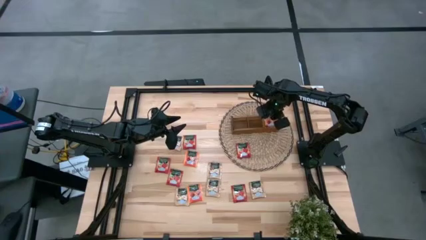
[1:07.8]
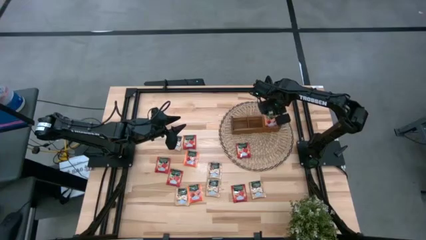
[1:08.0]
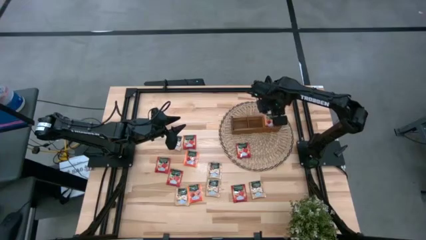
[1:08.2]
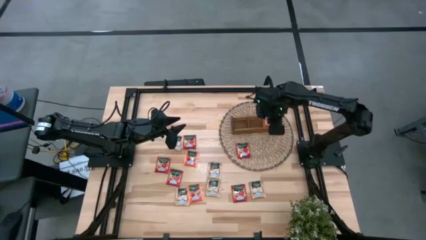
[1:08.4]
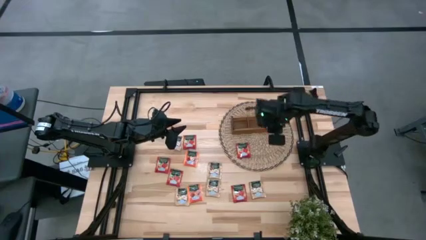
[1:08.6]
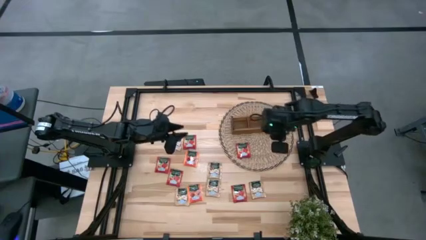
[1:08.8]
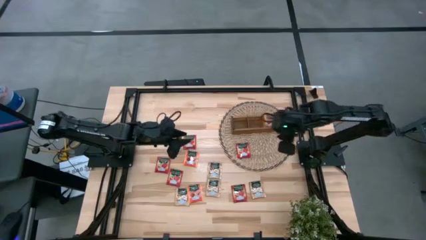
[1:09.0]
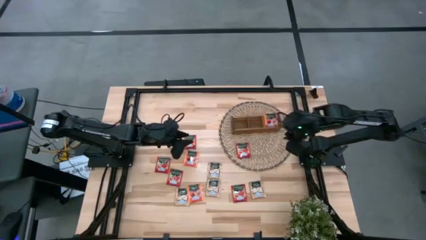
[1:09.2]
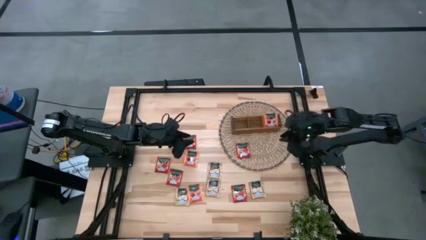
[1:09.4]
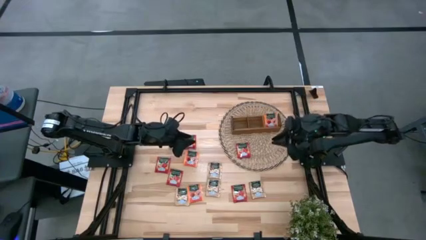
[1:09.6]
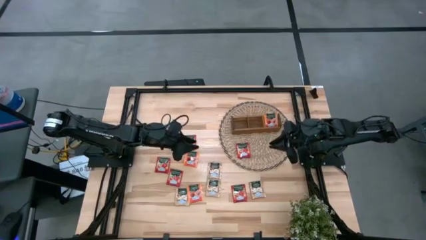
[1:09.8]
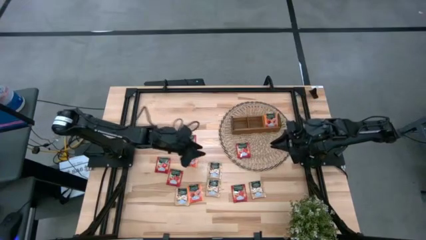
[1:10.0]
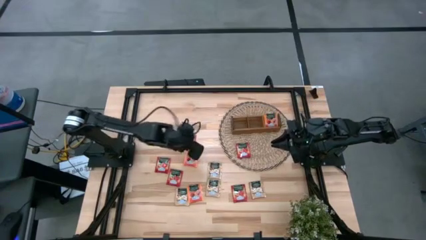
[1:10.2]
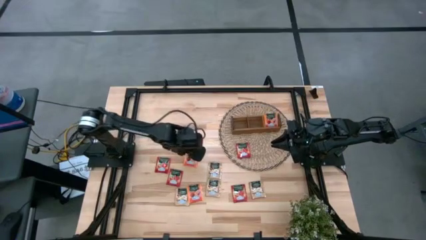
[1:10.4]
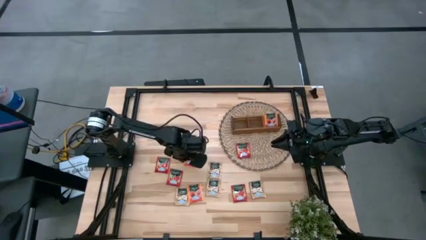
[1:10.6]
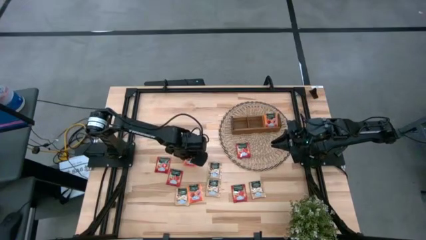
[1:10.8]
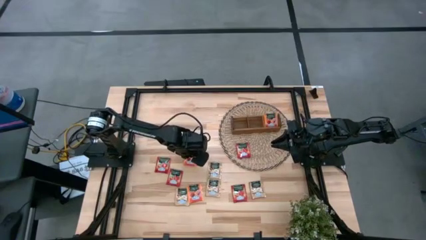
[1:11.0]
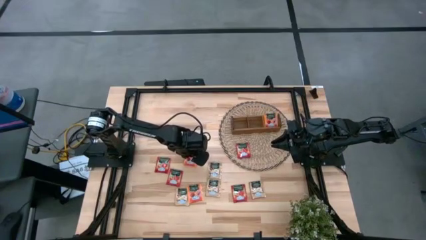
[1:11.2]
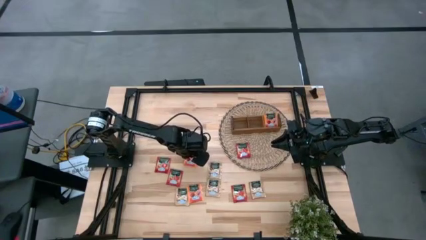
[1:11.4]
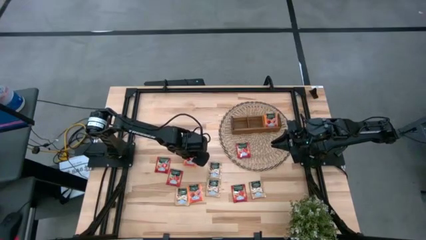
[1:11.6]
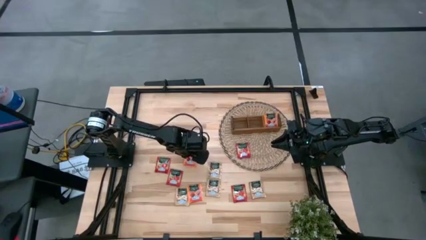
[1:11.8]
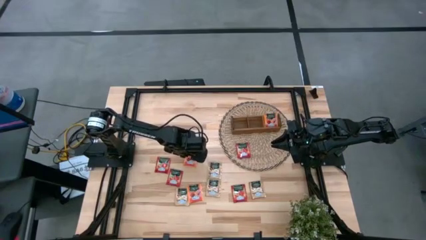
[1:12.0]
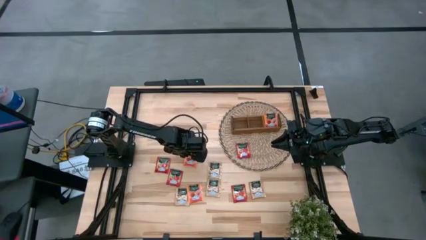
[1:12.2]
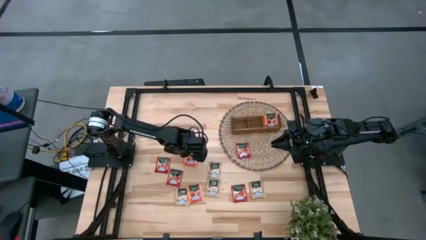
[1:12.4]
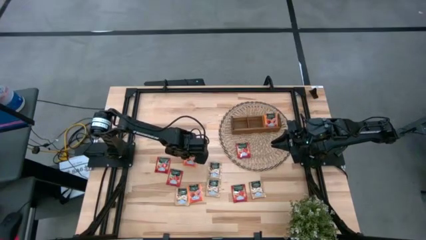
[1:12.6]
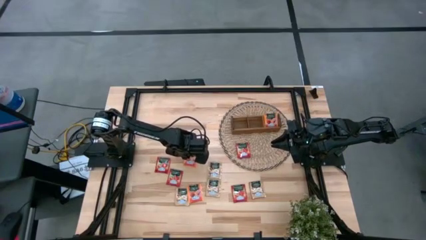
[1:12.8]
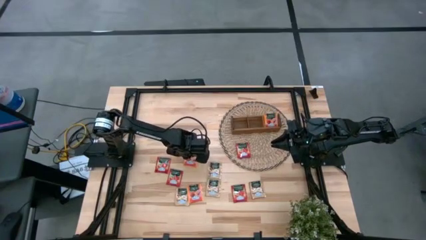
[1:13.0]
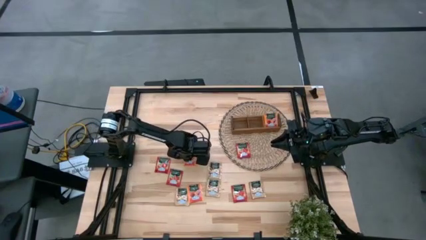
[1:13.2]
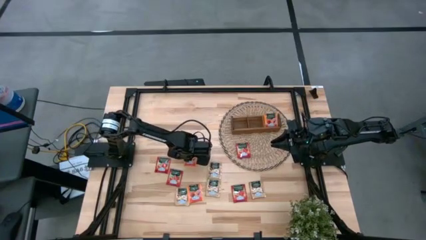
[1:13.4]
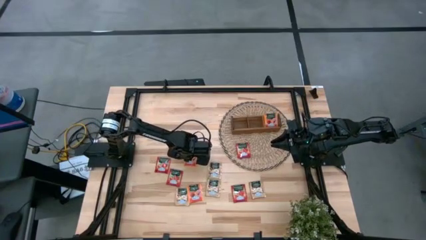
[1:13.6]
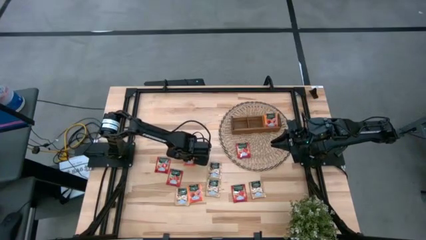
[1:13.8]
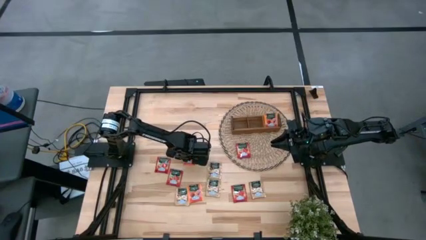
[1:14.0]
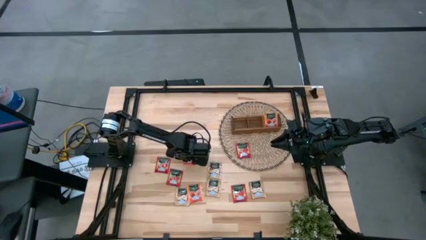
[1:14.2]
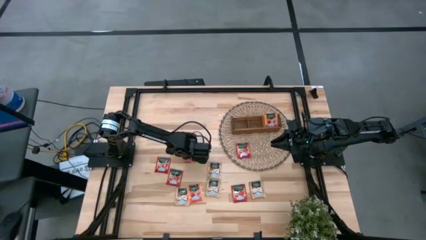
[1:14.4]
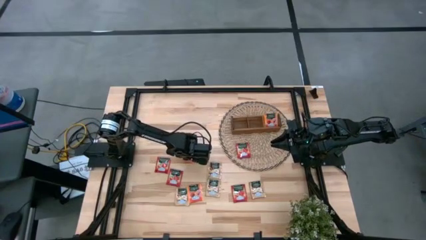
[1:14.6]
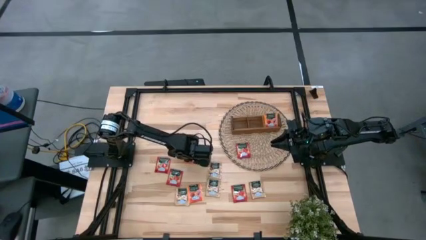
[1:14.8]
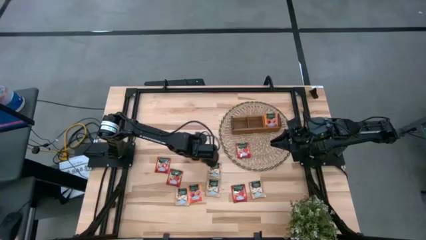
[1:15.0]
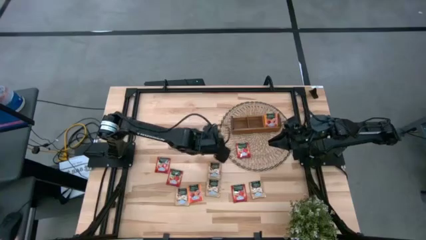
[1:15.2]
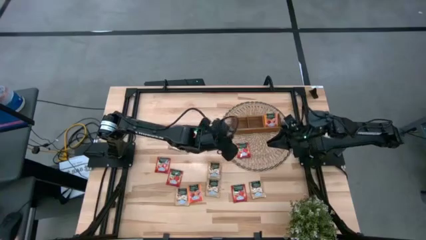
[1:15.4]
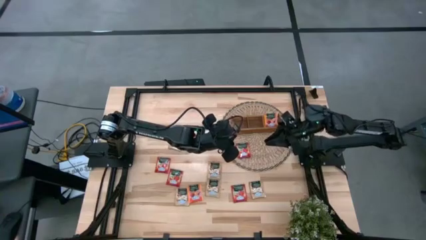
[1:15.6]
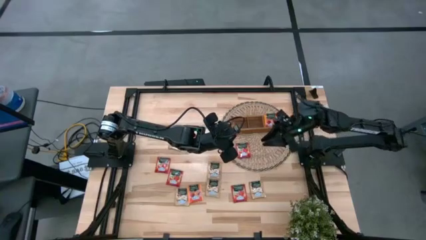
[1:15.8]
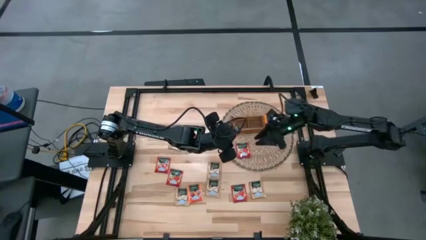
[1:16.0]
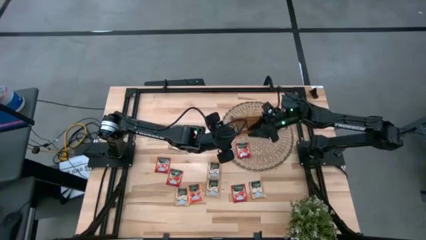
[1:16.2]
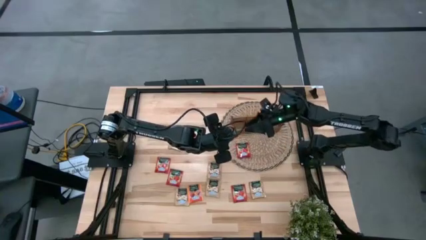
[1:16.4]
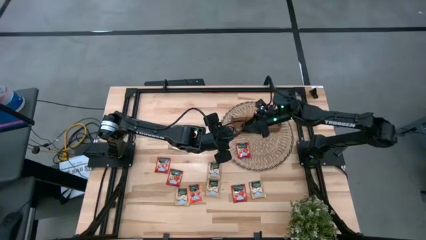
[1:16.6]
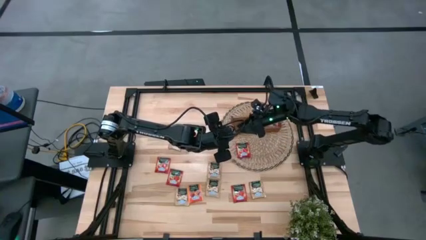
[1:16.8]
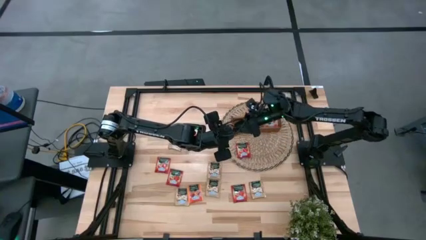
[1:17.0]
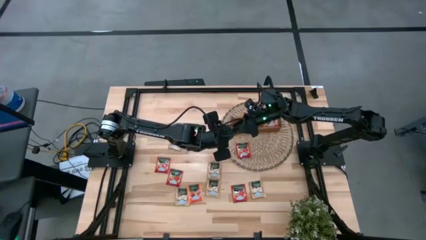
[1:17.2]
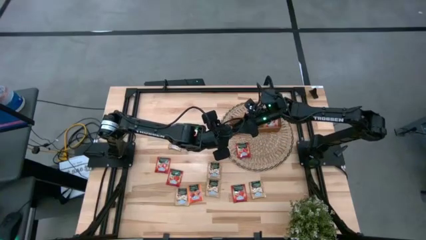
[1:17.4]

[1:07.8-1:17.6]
Task: Pick & Place Tea
Put the orange tea pack into the right compartment of the brown organizer

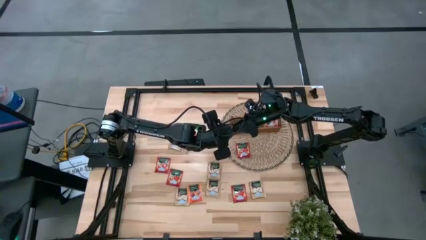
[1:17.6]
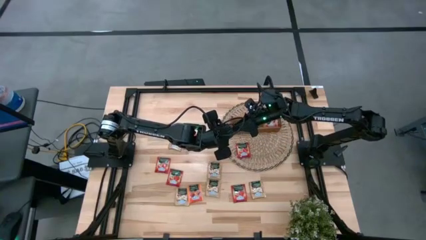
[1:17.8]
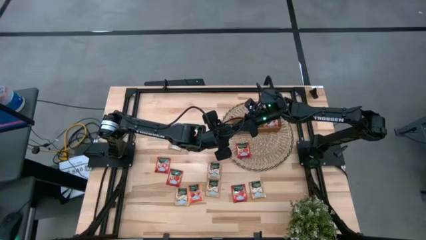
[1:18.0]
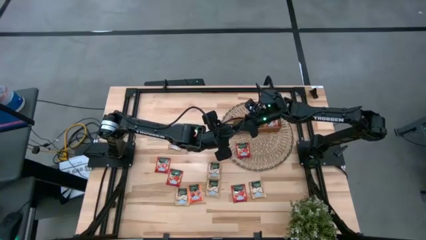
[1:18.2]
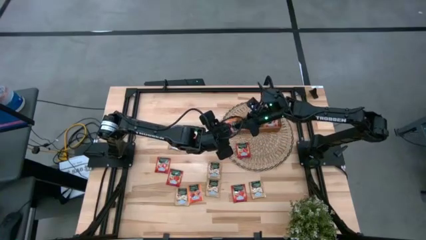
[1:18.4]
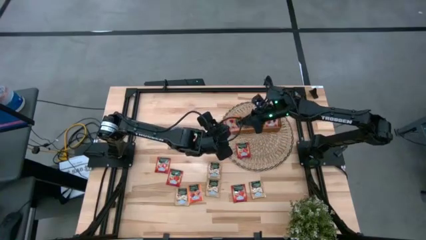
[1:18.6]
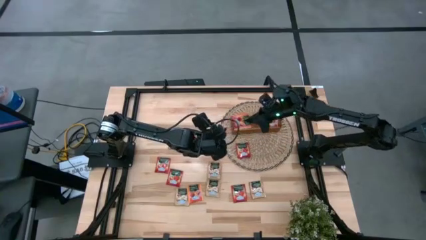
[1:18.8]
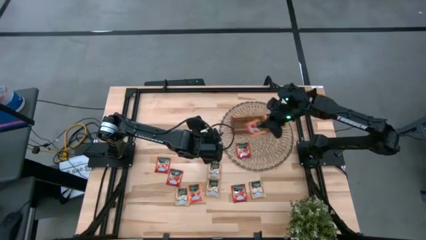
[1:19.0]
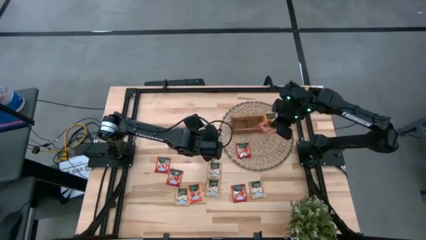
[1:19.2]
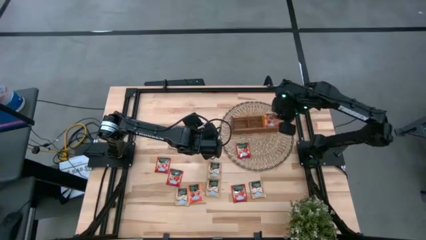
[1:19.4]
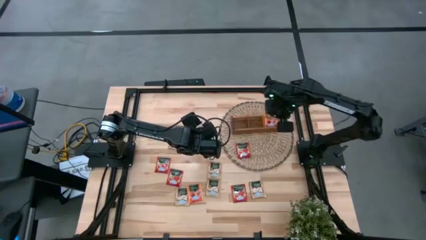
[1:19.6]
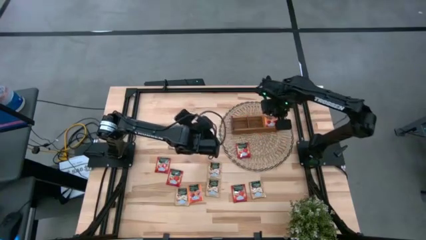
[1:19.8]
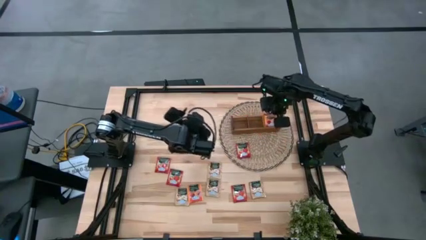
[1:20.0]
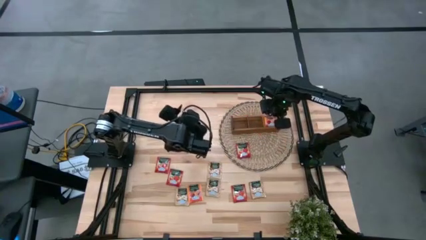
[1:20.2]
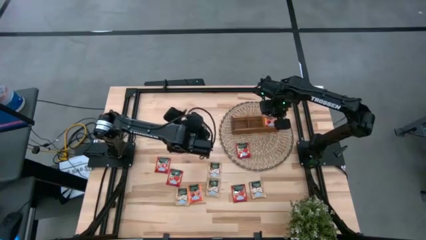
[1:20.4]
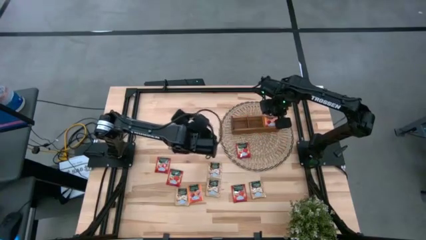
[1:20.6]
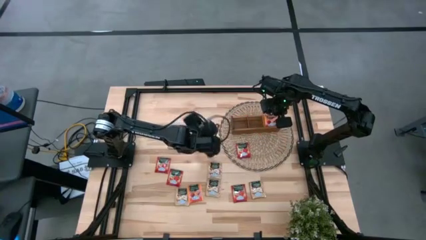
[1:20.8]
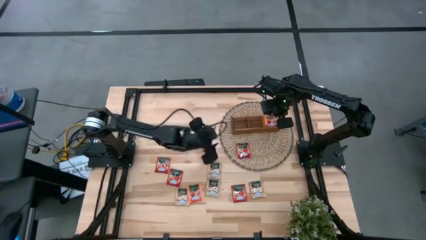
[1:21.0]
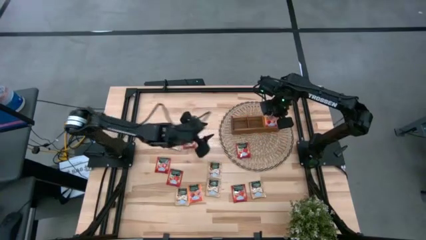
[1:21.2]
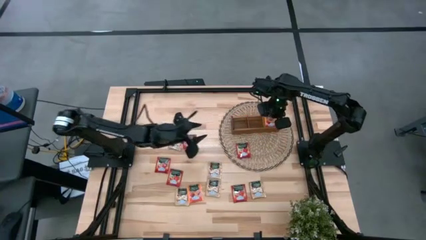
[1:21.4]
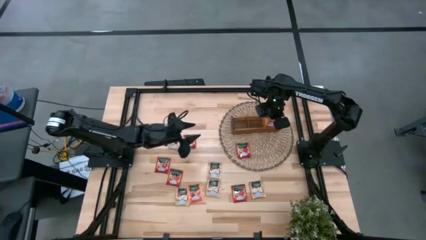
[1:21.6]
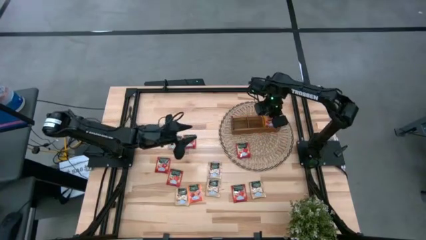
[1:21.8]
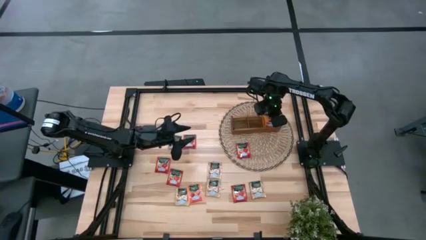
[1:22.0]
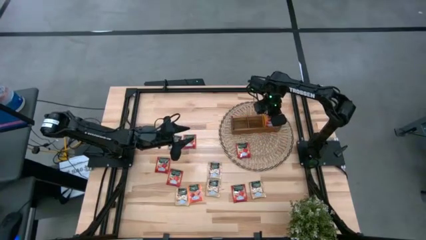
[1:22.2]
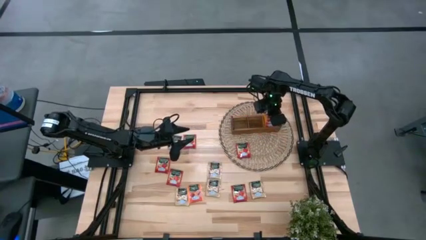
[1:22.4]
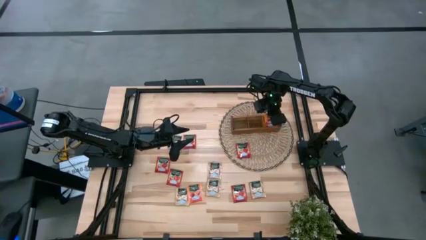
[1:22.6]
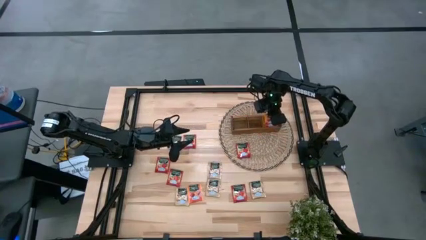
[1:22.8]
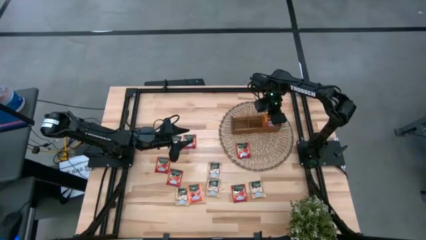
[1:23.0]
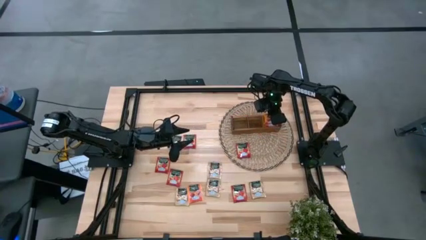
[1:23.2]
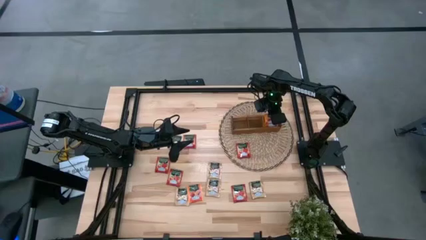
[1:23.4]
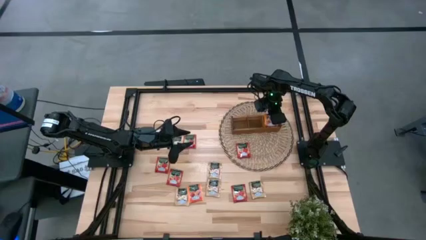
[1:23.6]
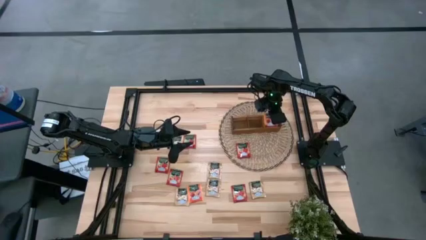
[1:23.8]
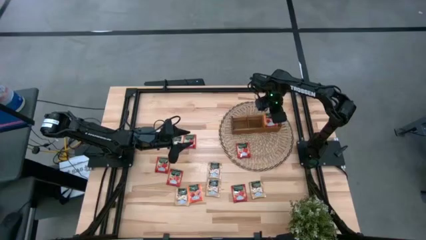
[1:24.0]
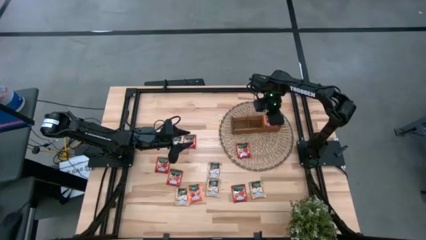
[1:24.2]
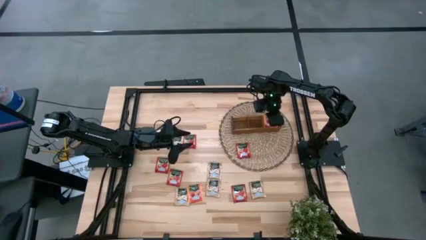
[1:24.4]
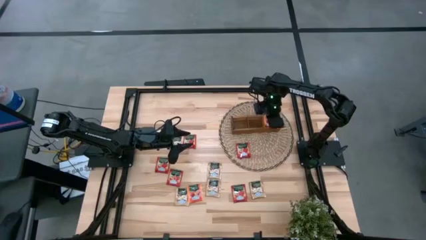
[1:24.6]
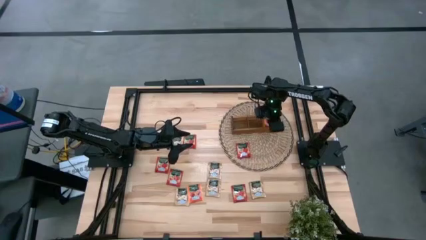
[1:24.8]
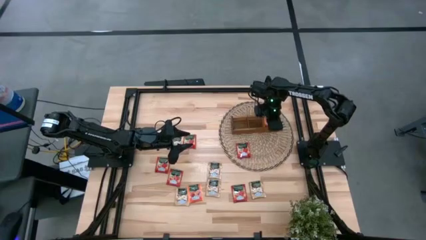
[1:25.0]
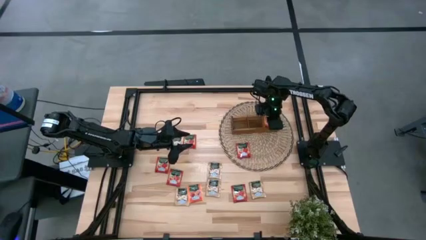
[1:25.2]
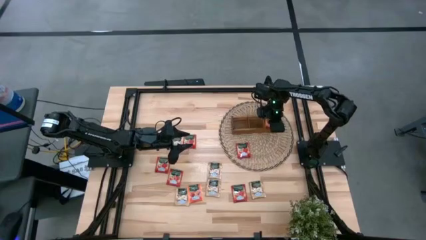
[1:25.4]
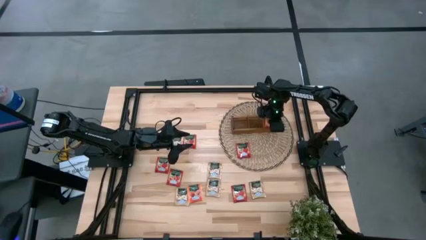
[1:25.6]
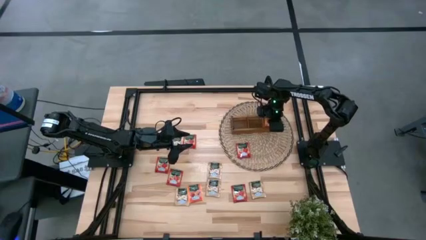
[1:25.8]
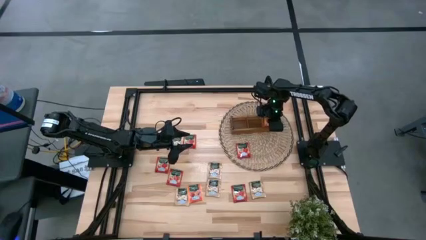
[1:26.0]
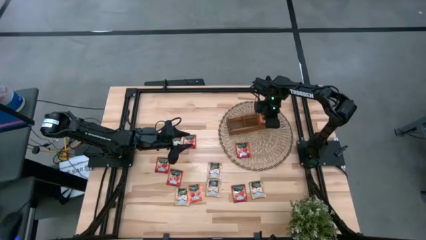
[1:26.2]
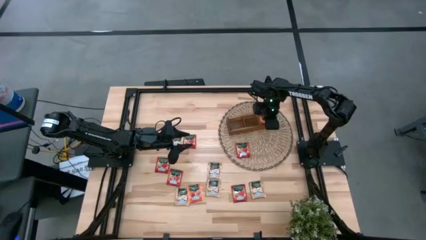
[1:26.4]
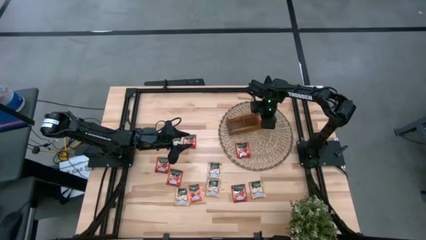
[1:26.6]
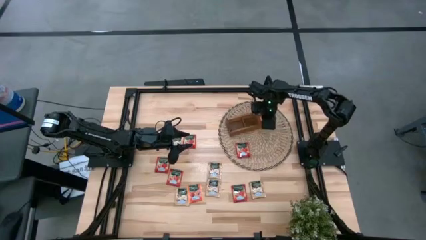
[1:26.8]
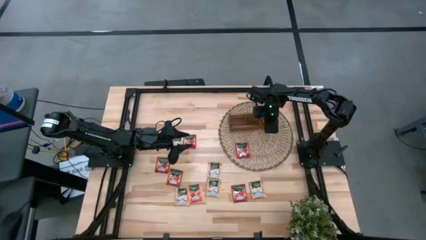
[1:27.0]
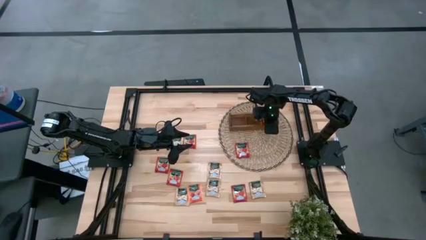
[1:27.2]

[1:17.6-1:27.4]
Put the orange tea pack into the right compartment of the brown organizer
